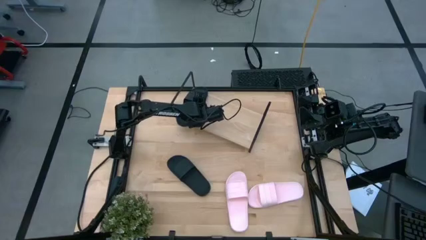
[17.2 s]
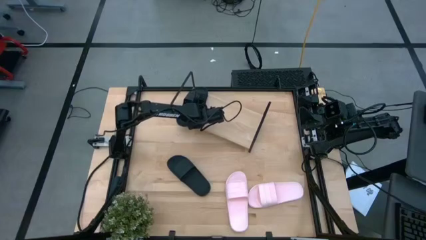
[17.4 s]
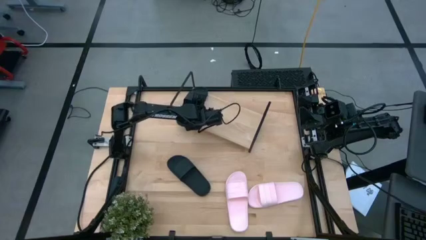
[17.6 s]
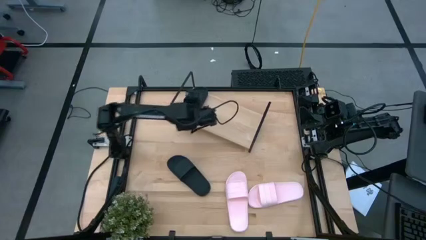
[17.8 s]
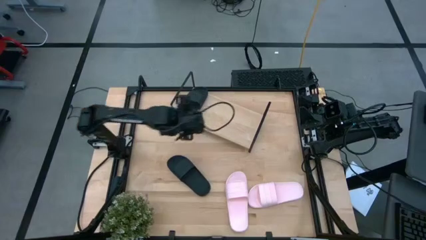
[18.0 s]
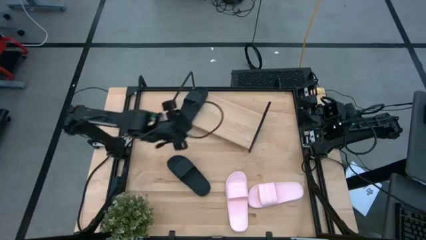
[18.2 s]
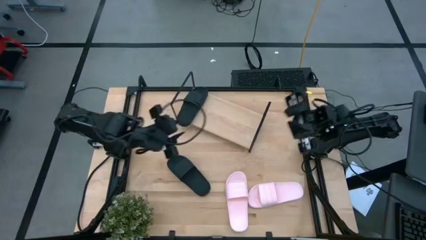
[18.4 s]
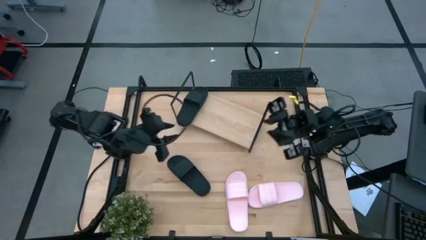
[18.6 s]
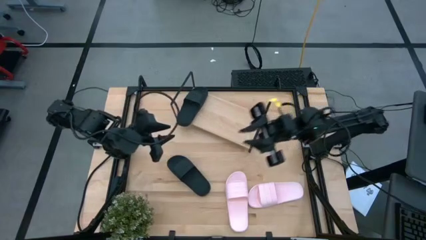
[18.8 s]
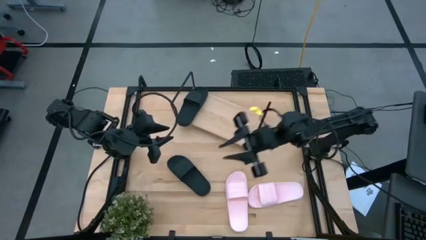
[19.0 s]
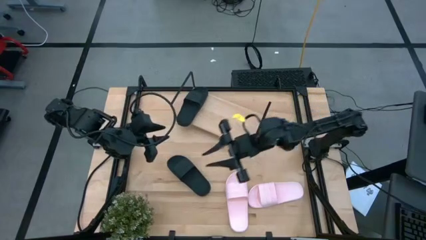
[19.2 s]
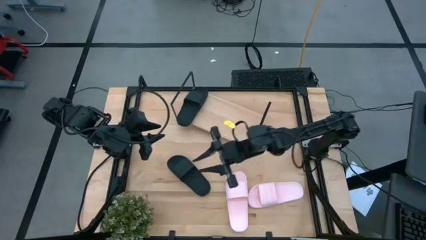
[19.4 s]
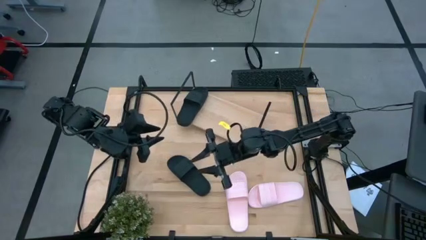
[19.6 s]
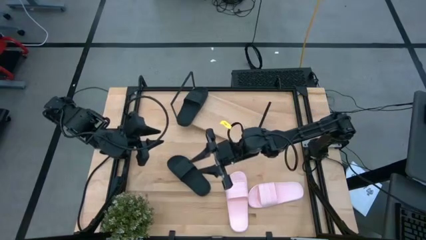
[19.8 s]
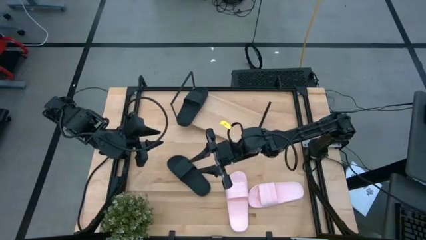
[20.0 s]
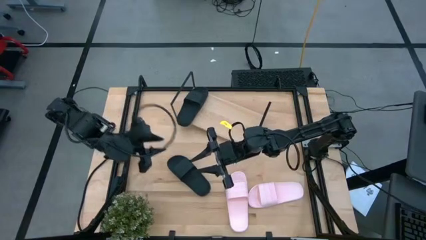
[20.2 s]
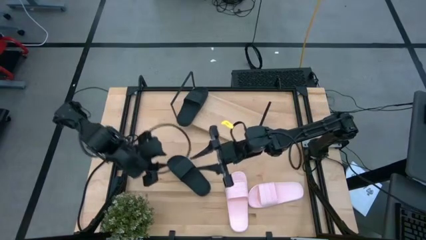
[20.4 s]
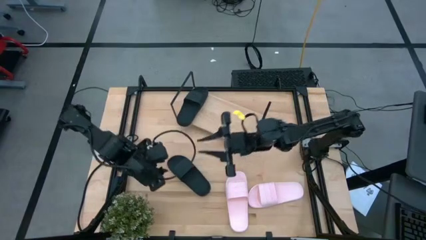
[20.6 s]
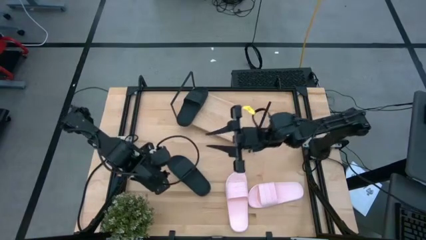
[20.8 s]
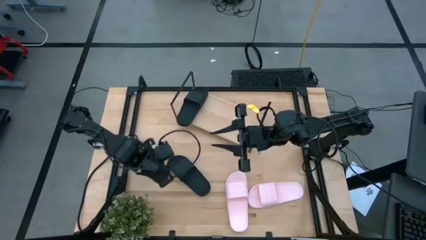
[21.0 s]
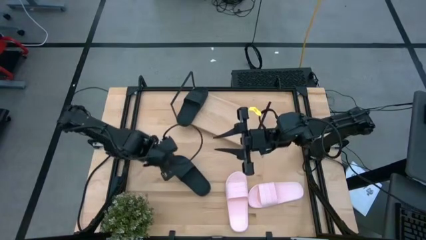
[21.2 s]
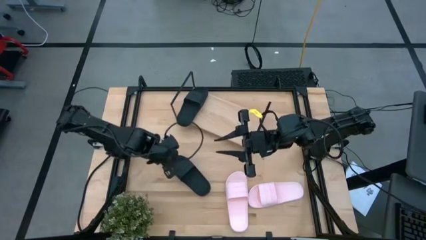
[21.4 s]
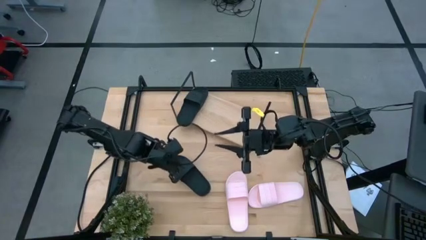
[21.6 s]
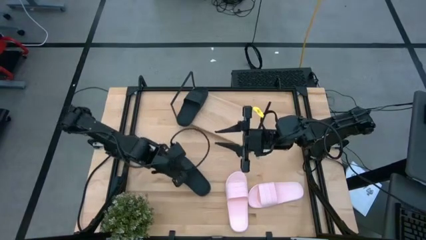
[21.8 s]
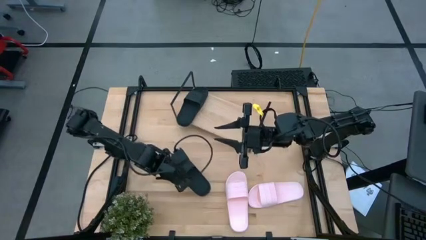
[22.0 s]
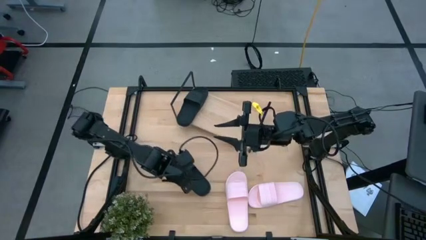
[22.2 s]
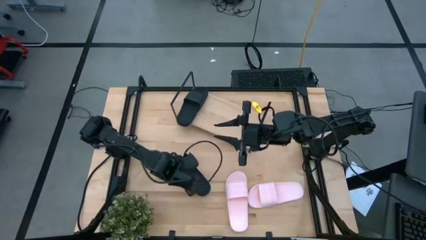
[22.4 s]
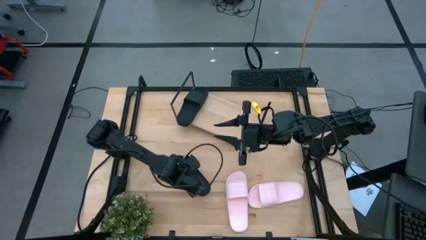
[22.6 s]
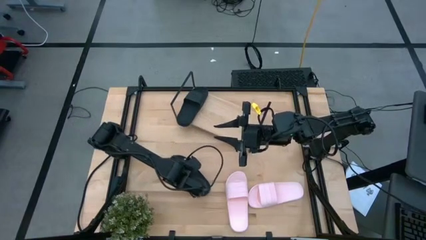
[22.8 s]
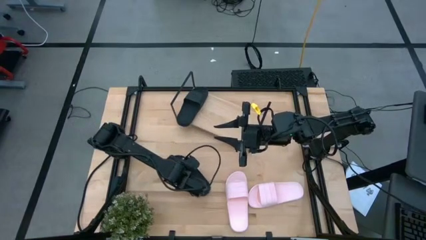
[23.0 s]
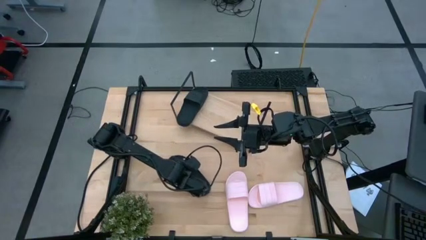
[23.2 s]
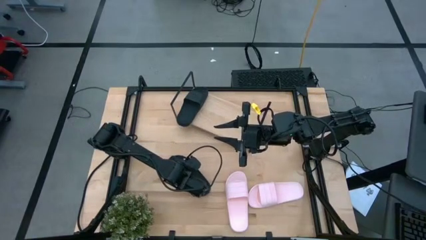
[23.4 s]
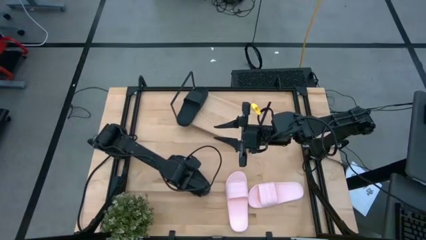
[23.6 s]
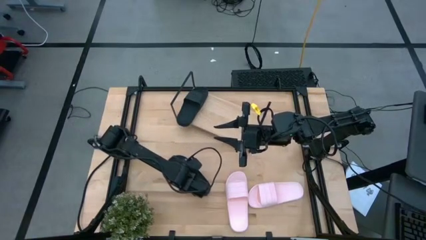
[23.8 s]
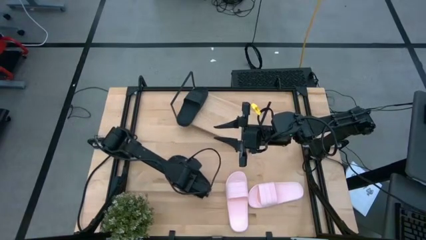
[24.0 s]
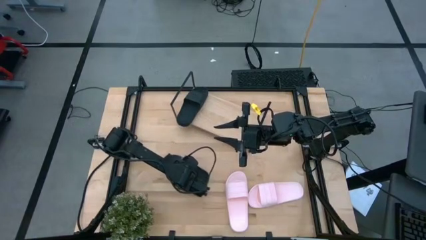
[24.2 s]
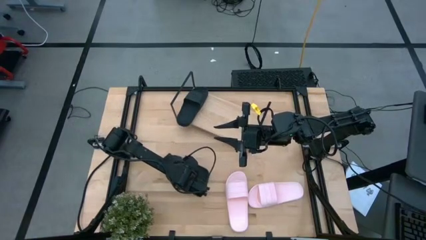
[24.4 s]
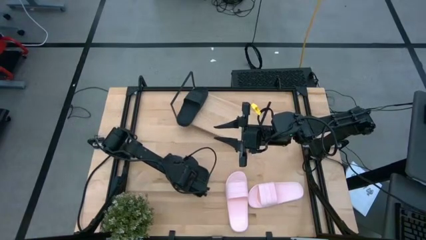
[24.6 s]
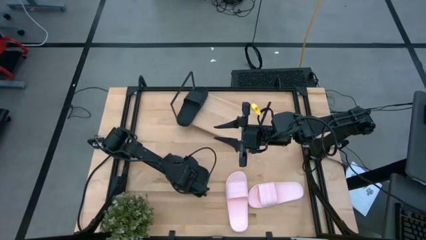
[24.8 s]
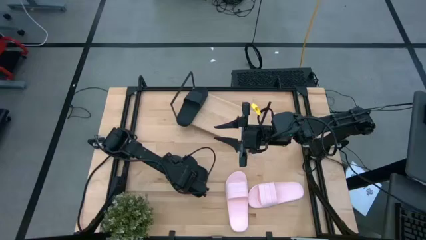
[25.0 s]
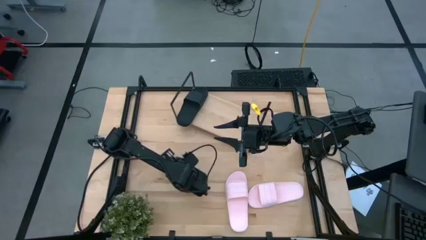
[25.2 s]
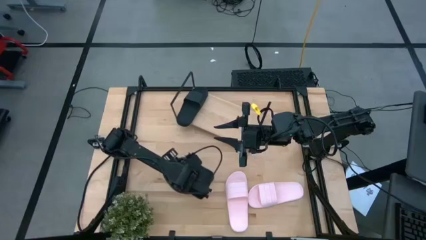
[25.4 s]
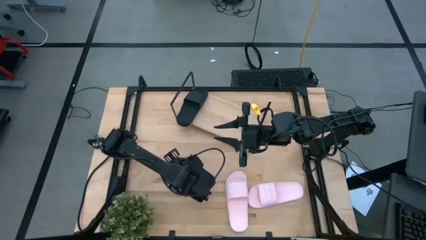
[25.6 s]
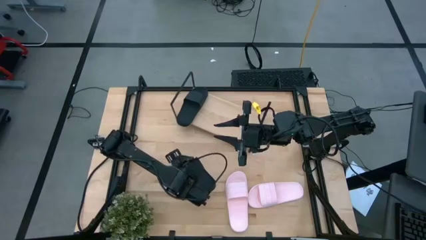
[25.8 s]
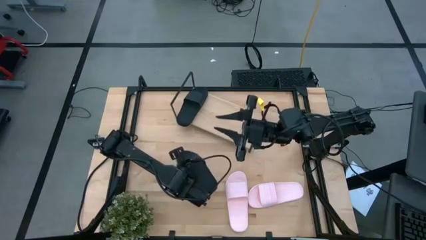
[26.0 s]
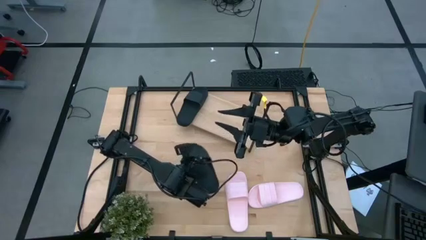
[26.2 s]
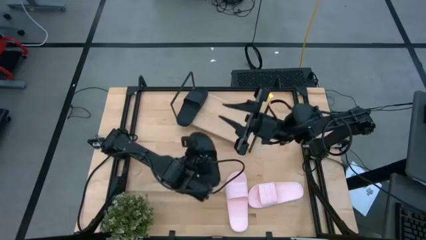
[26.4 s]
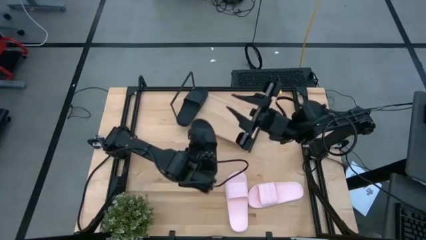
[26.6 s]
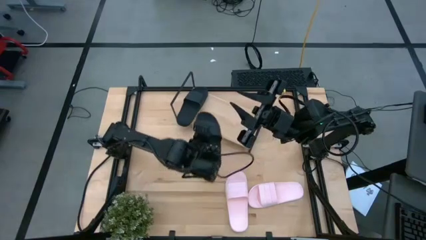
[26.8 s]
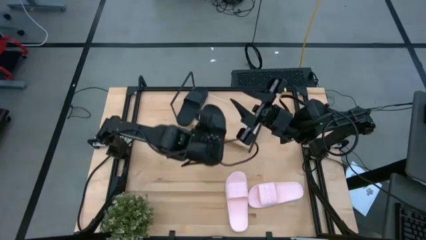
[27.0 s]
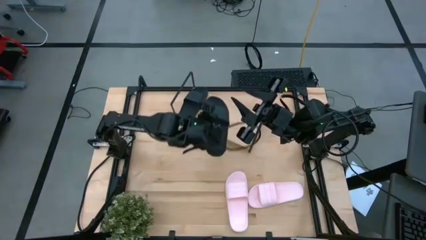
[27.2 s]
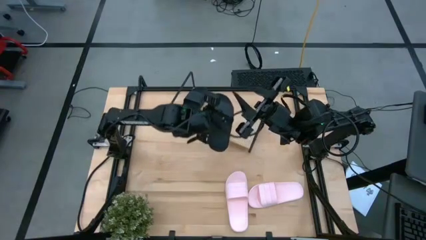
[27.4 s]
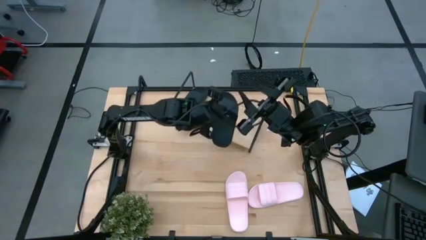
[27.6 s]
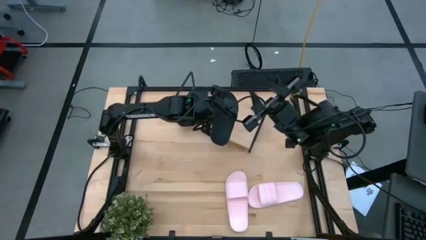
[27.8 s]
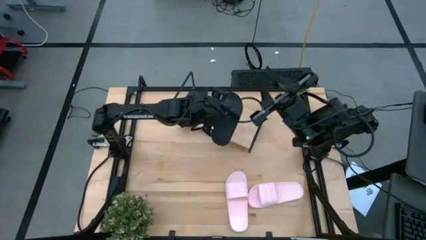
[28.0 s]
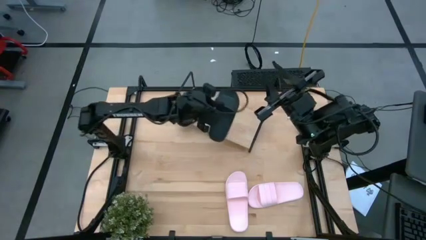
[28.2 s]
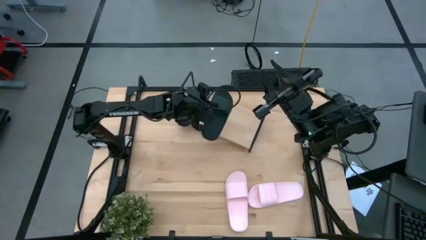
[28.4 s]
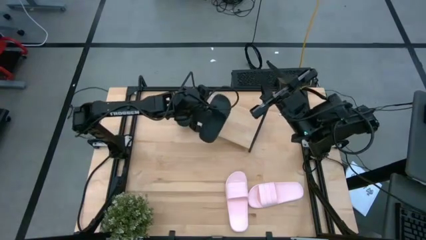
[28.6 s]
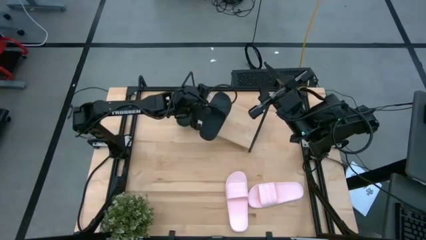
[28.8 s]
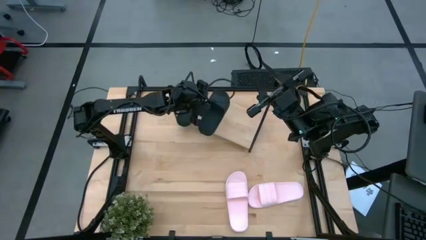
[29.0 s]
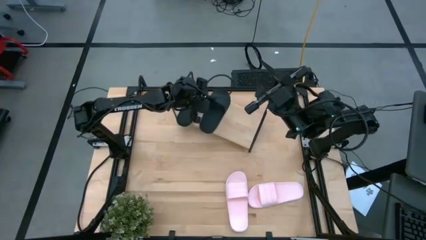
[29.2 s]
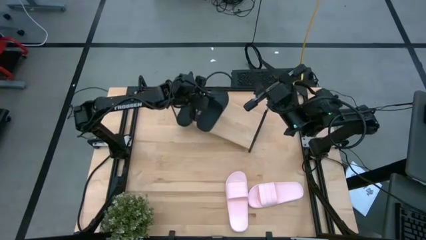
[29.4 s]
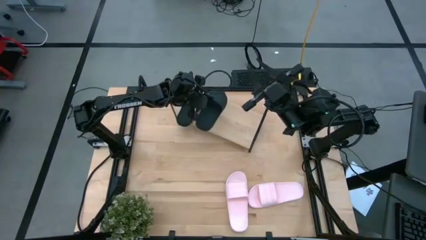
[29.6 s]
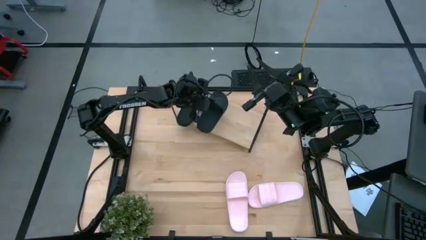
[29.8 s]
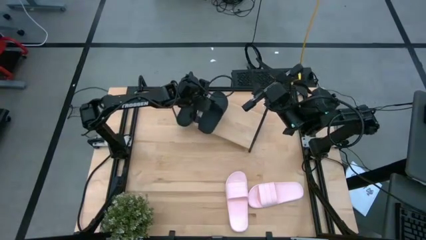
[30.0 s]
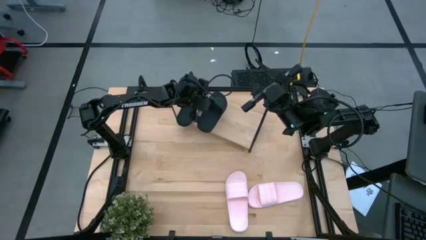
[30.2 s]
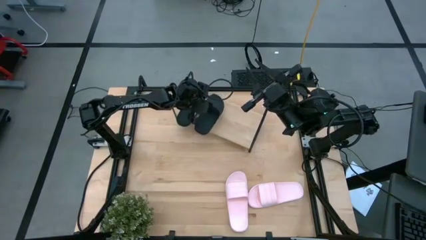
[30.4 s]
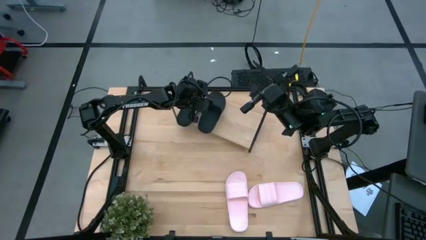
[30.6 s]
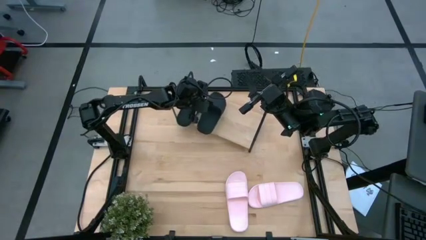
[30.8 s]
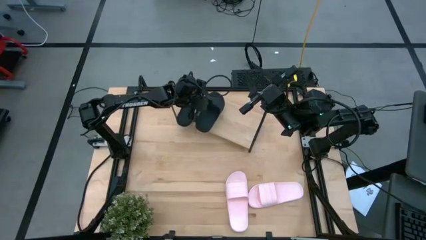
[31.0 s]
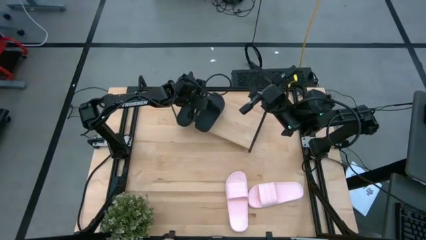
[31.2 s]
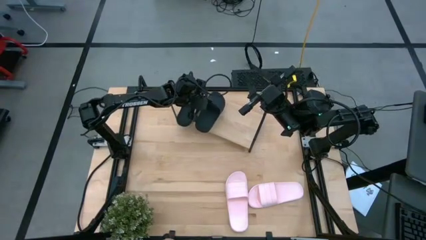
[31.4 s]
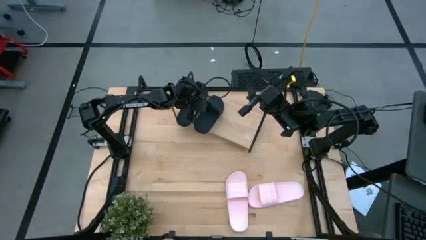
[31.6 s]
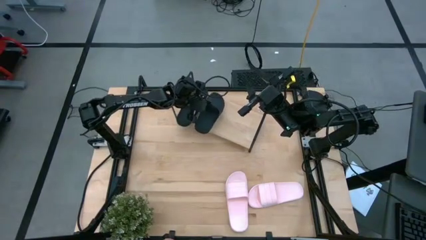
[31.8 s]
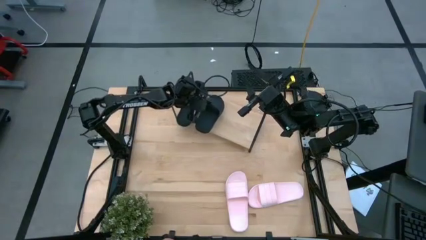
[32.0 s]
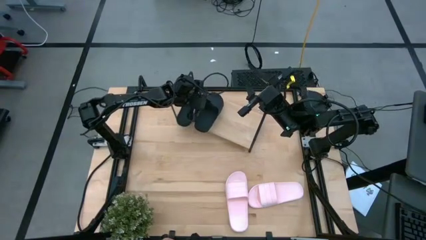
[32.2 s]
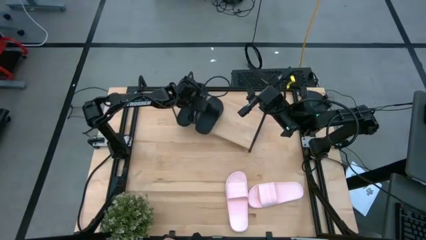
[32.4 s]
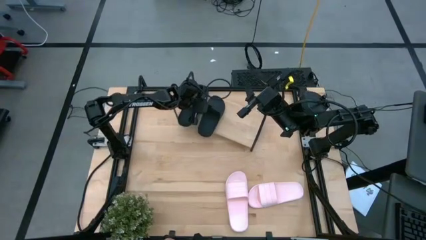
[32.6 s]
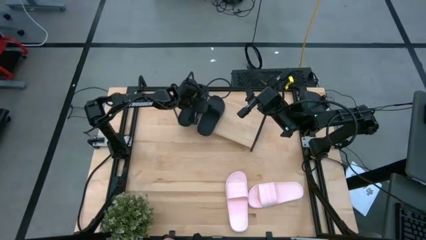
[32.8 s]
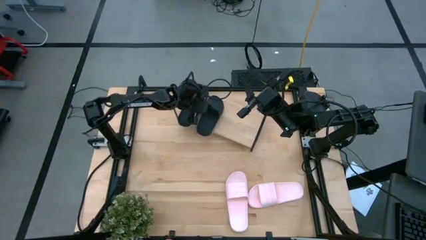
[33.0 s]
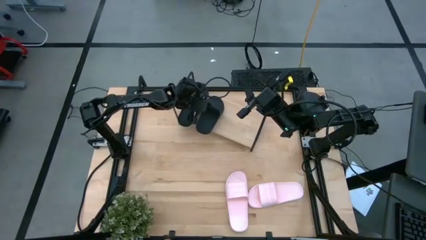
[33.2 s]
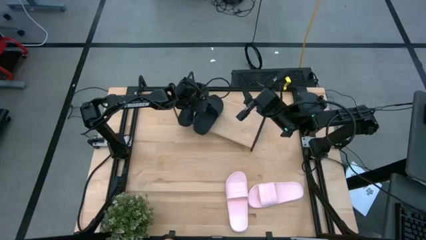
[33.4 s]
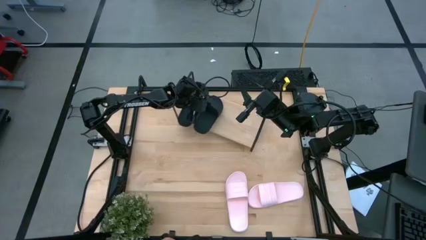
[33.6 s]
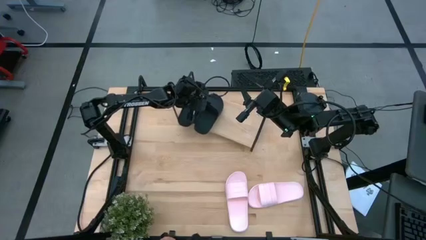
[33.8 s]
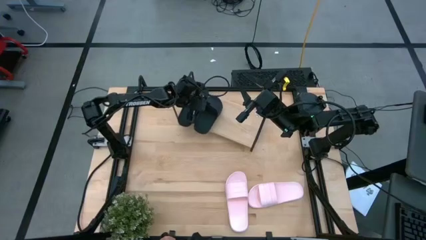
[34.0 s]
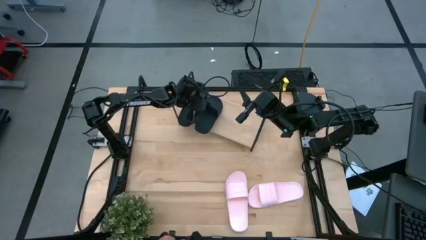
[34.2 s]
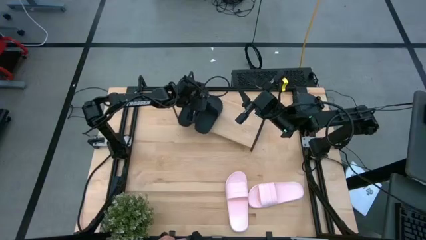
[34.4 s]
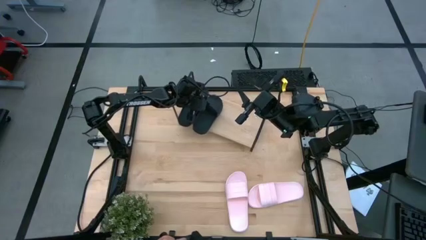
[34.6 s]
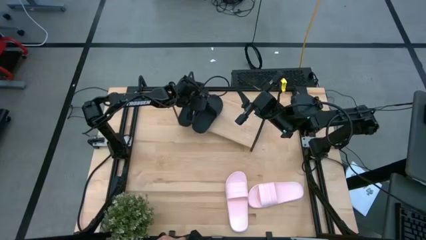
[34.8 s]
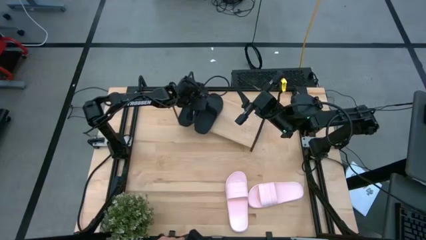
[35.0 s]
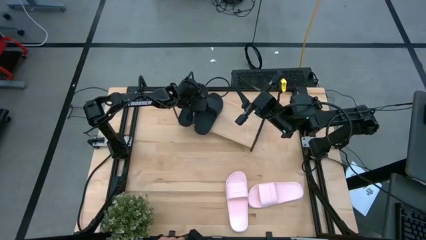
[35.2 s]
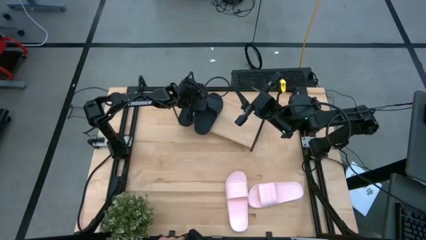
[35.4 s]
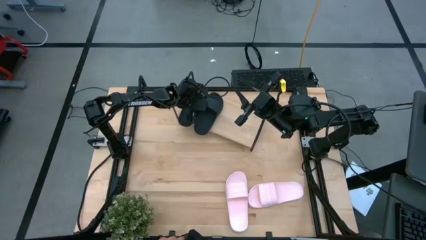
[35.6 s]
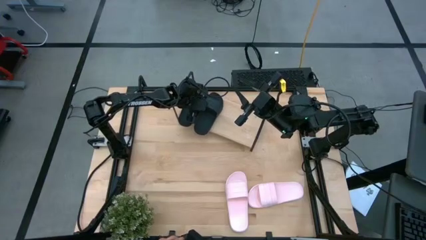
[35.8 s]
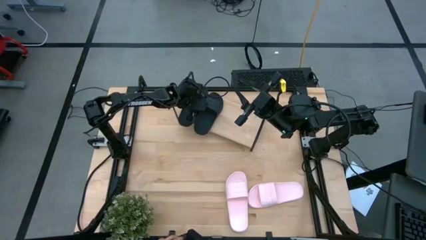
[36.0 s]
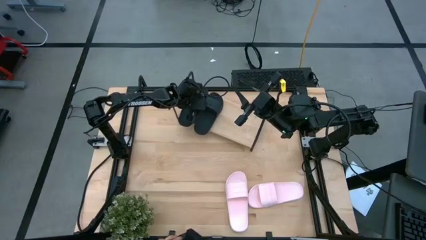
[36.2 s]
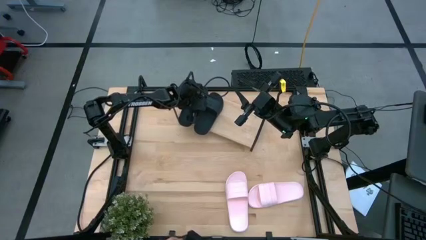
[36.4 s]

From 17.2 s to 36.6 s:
Task: Pick and place slides into the shelf
Put the black slides on the shelf
